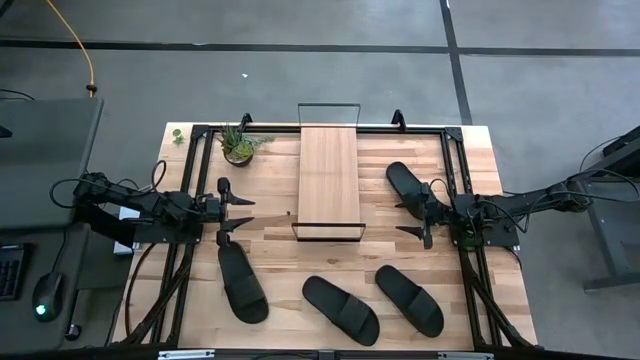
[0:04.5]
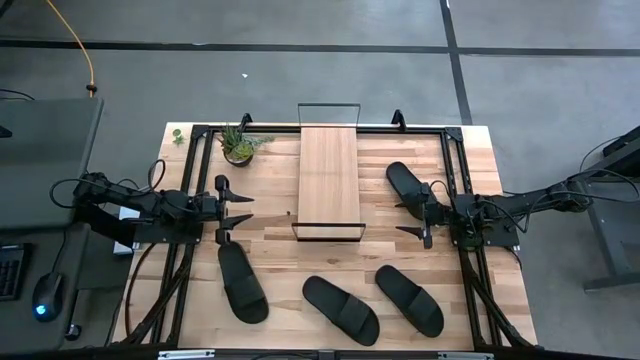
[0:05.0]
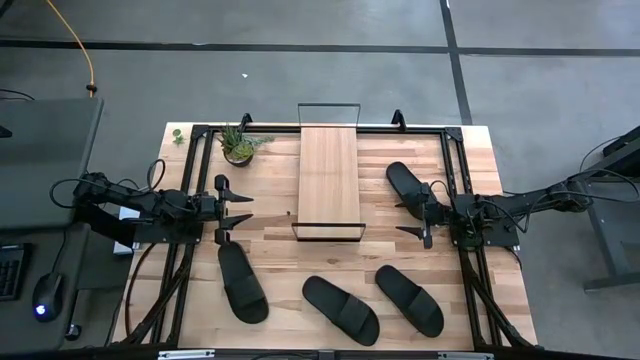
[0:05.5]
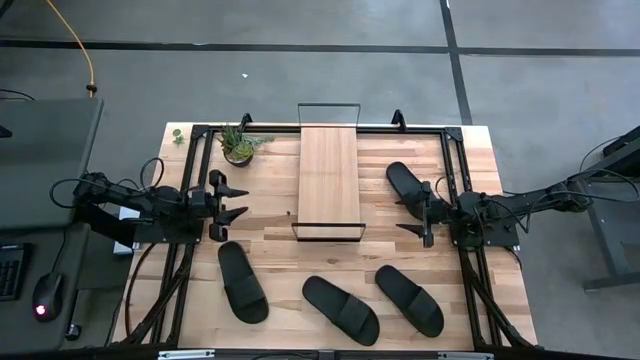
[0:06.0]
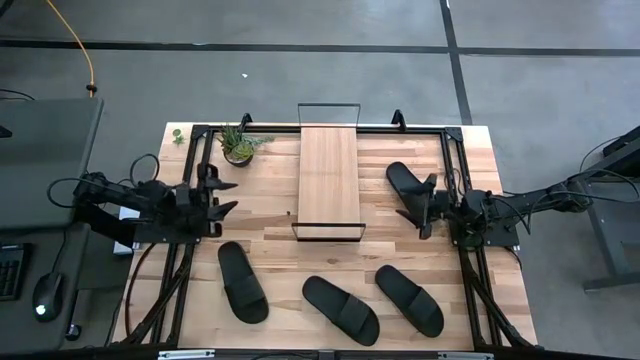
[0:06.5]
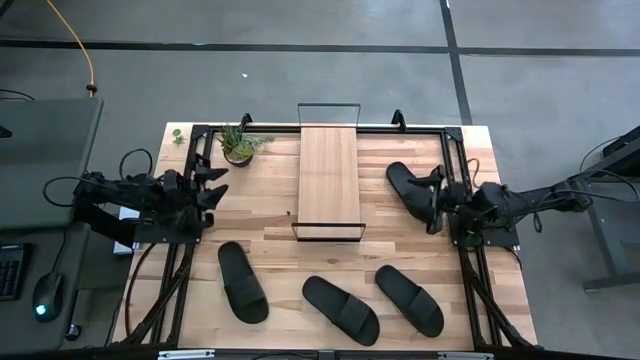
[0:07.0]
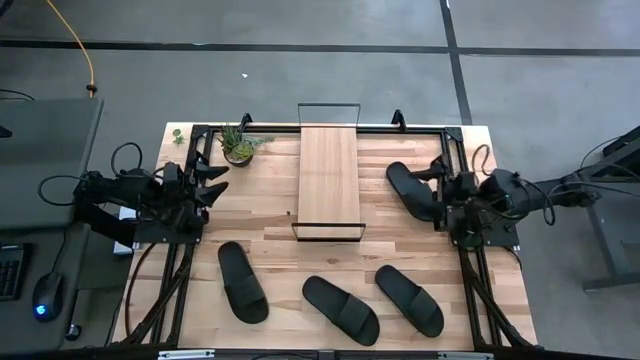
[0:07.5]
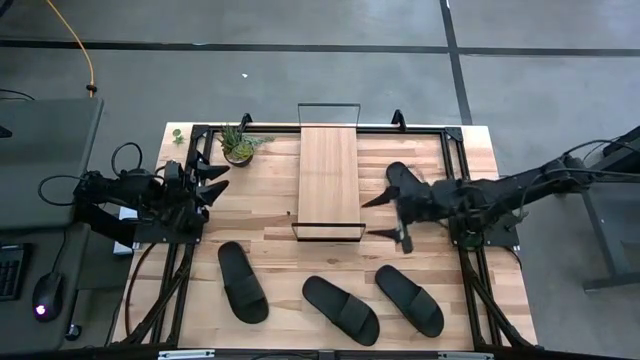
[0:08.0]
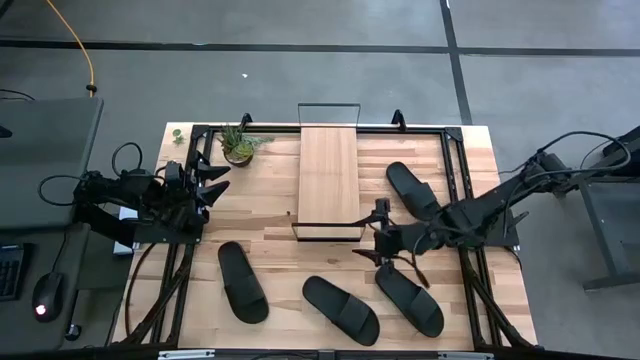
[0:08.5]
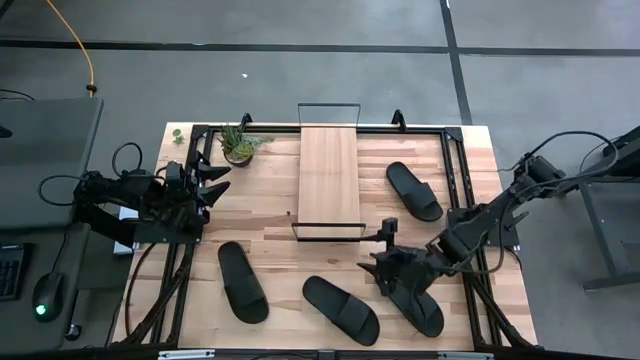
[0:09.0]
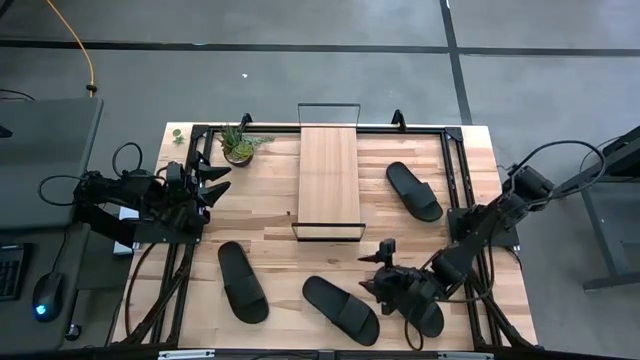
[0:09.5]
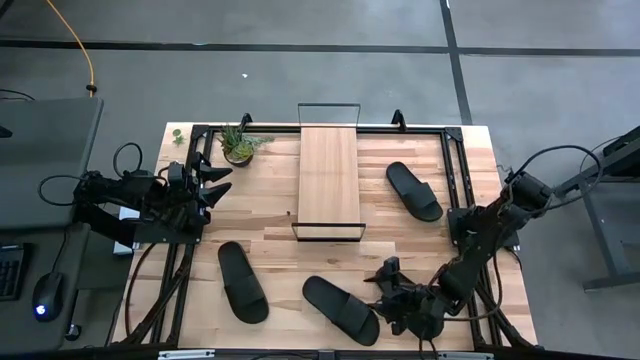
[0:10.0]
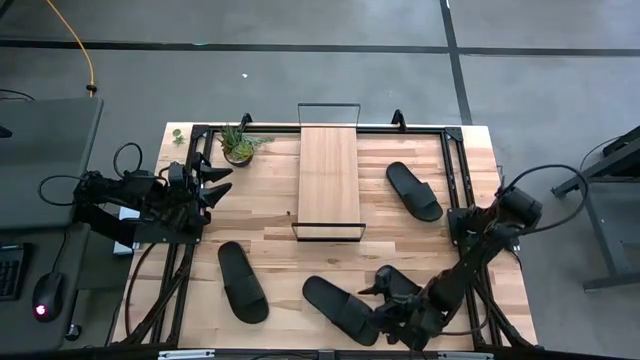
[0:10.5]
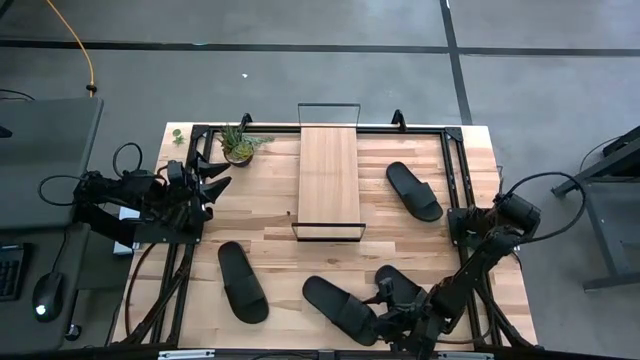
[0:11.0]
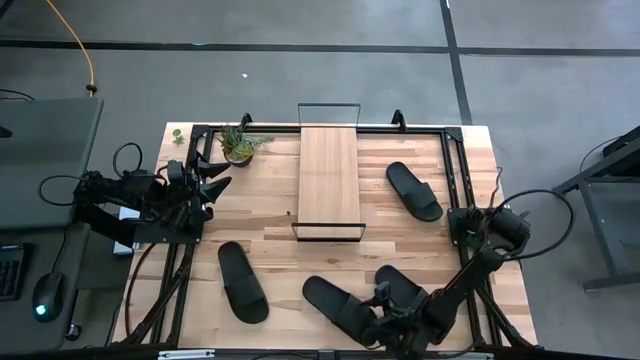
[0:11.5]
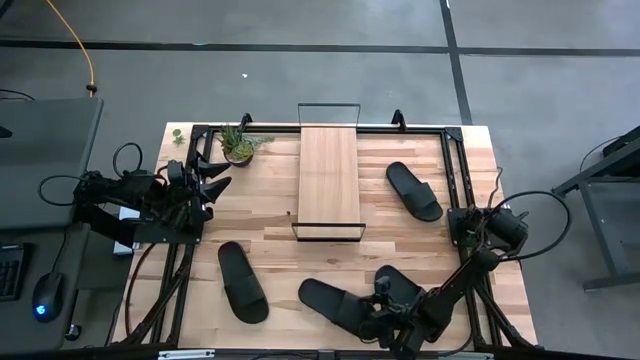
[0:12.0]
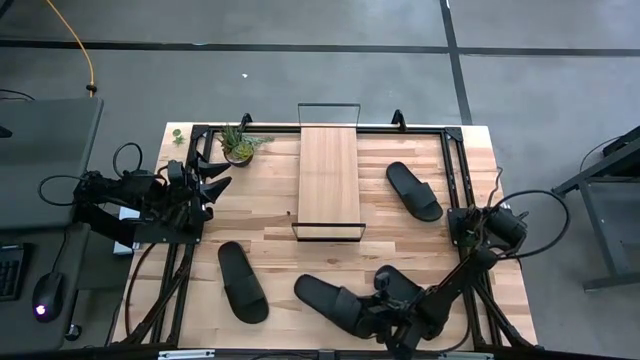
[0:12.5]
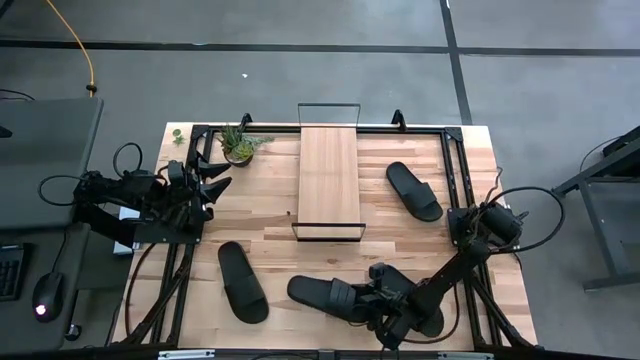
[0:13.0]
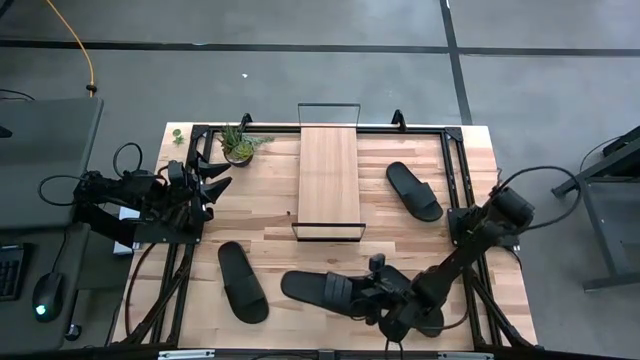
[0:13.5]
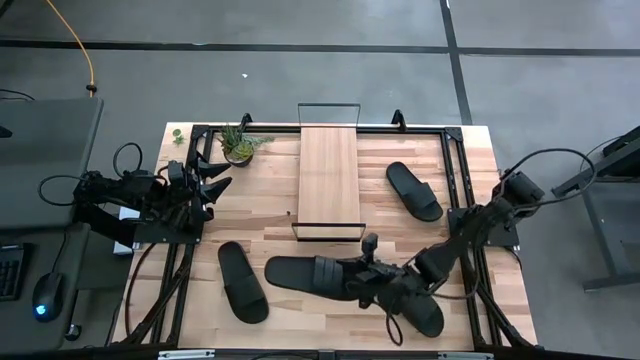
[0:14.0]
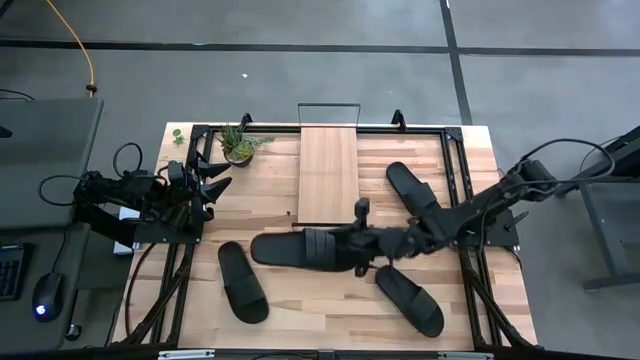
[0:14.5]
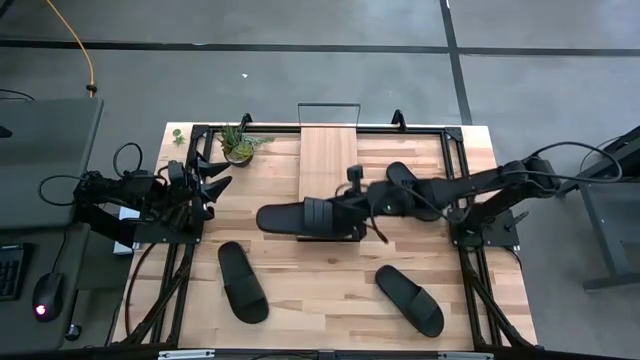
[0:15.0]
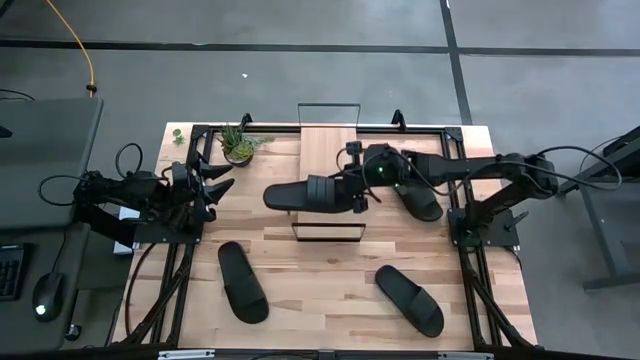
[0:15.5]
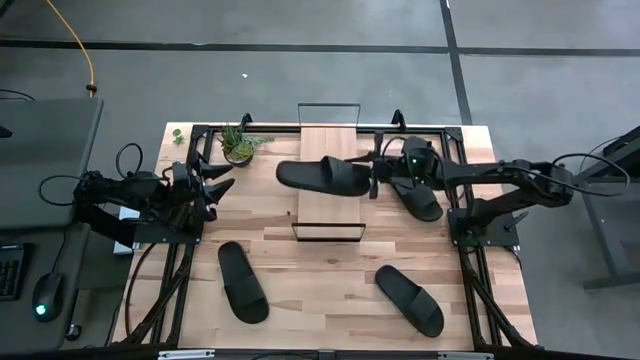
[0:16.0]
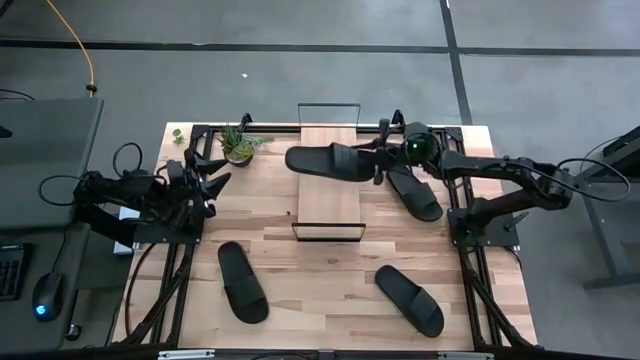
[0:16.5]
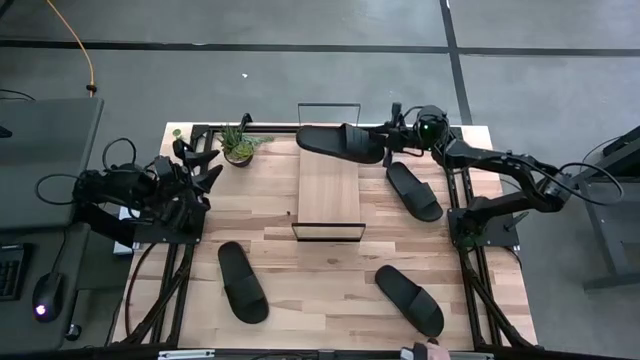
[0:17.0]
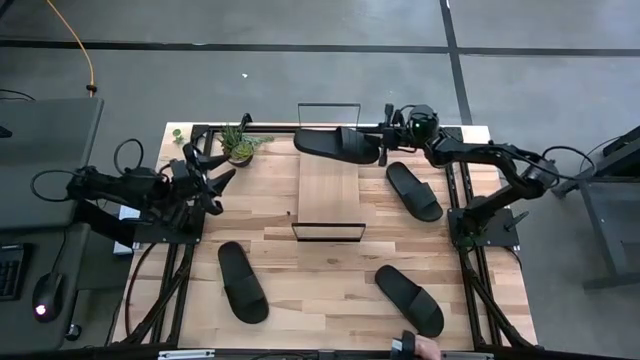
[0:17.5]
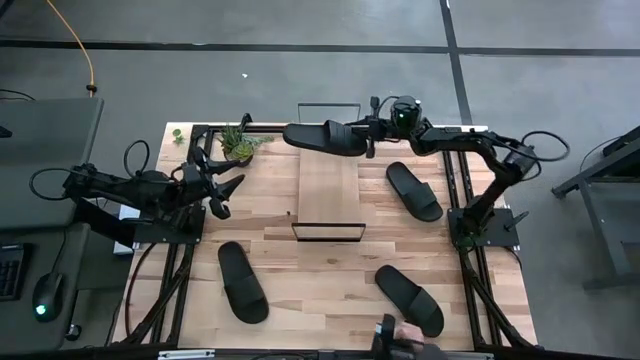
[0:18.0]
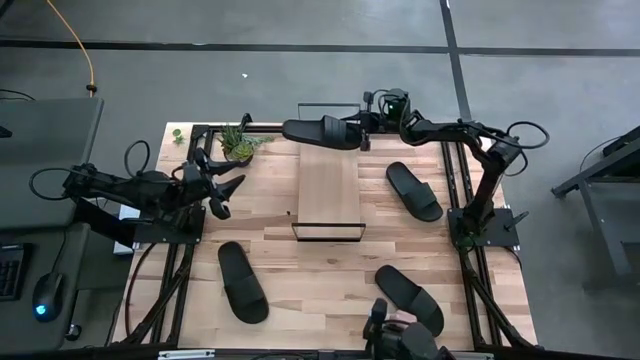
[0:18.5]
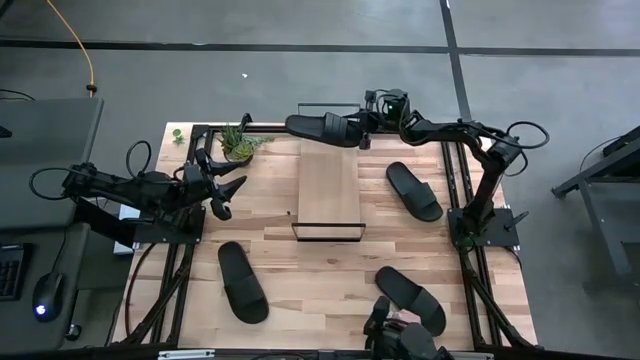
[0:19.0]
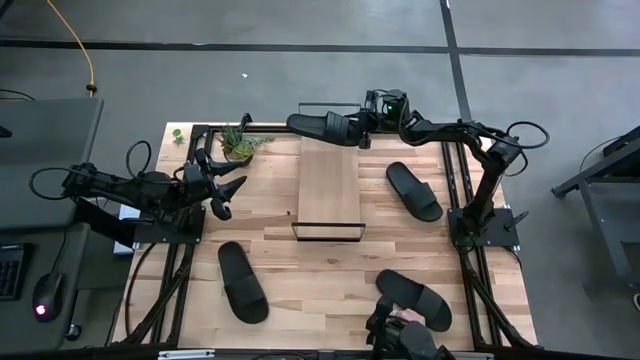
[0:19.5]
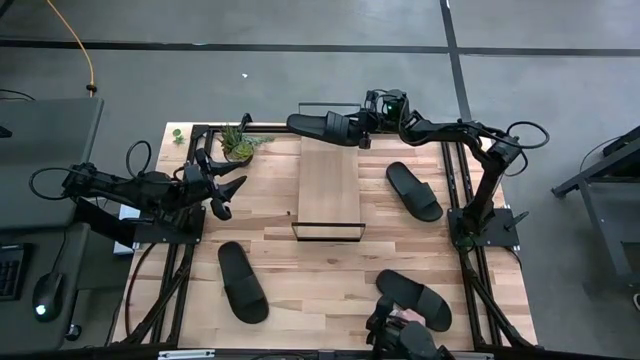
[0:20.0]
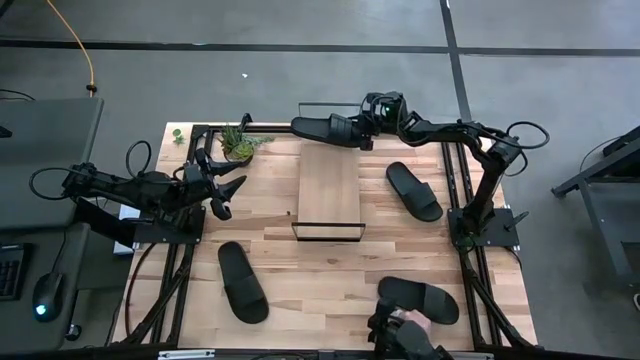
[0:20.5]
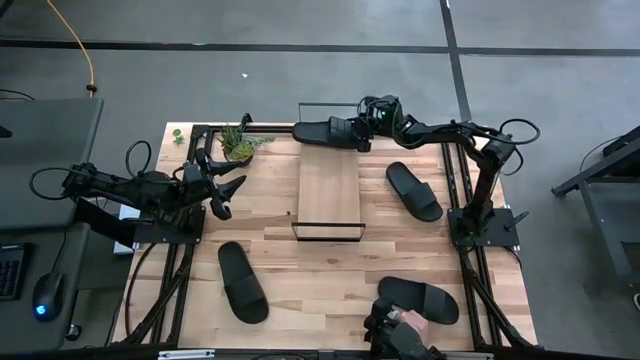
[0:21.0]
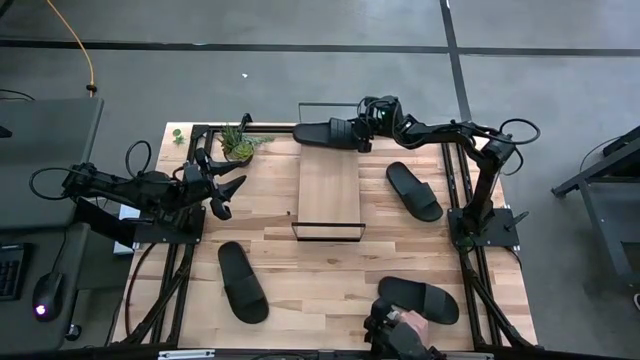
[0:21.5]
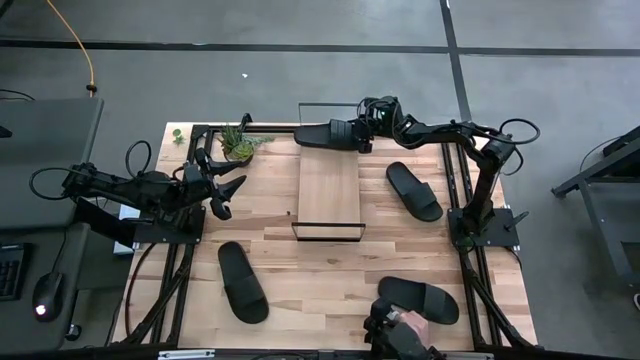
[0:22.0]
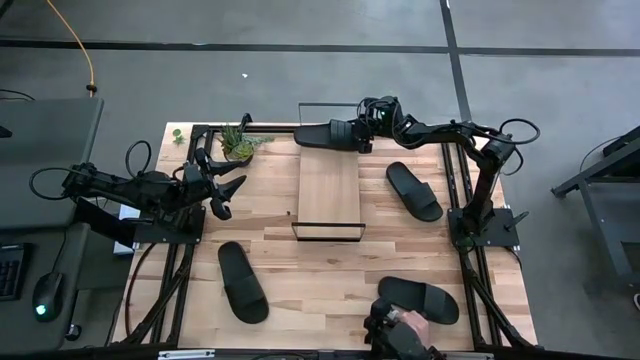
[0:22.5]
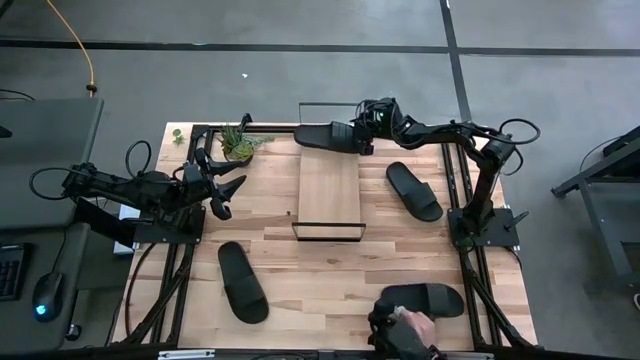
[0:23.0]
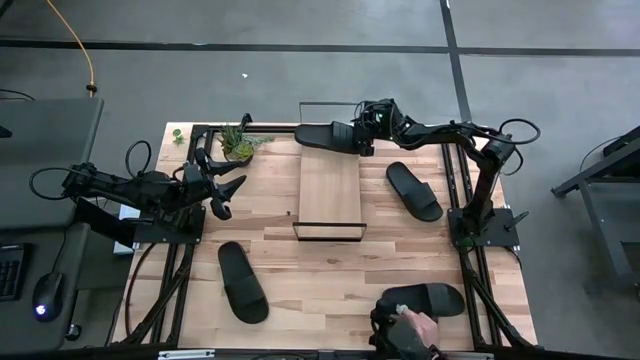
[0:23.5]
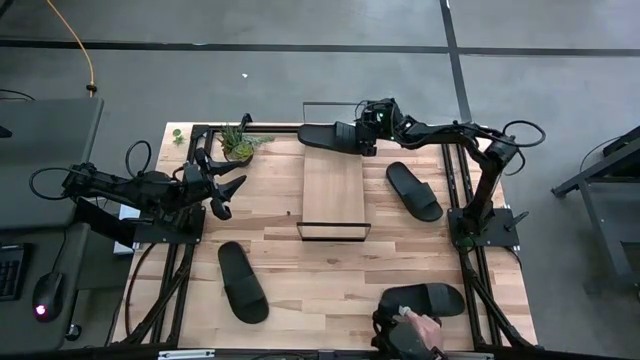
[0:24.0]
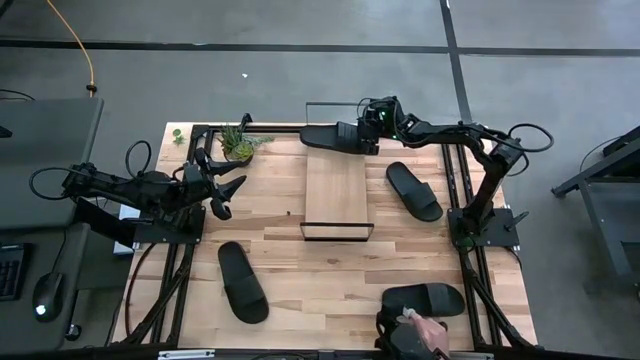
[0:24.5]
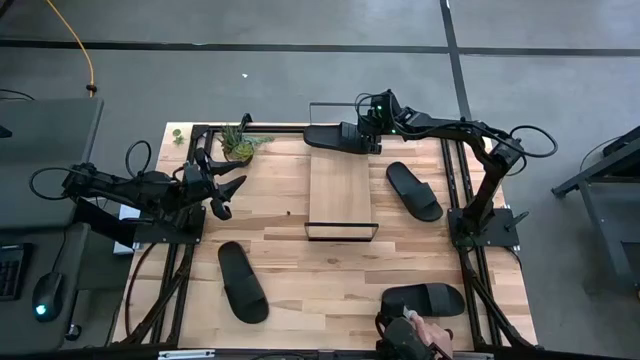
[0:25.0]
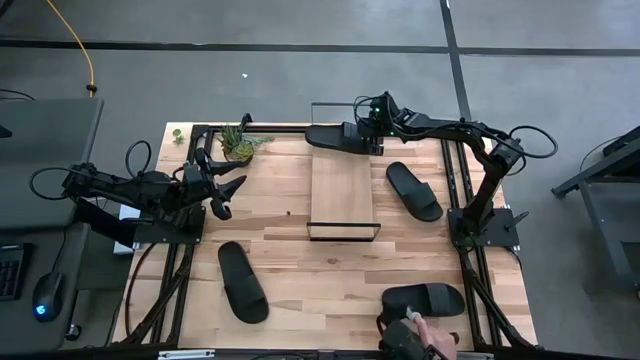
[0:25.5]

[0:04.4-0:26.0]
Task: Pick and place slides into the shelf
Put the bottom center black slide on the shelf
